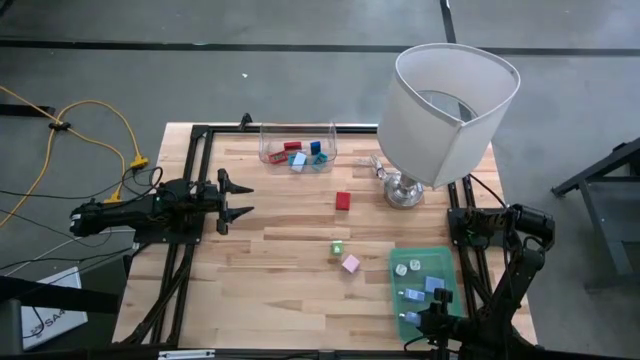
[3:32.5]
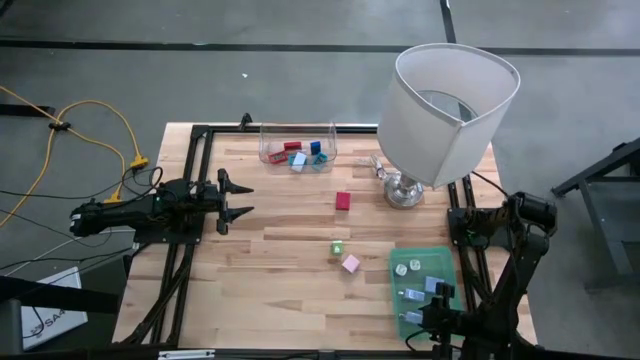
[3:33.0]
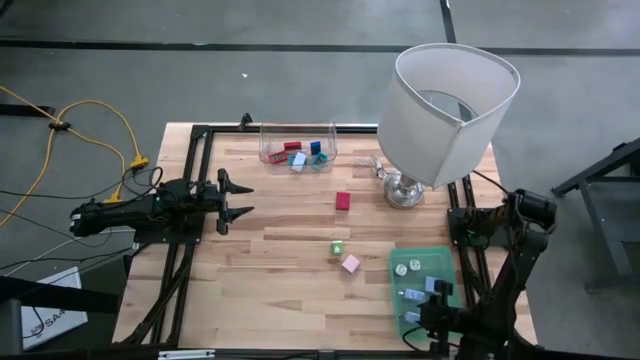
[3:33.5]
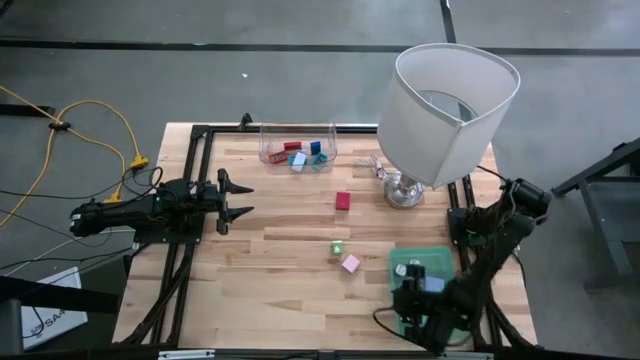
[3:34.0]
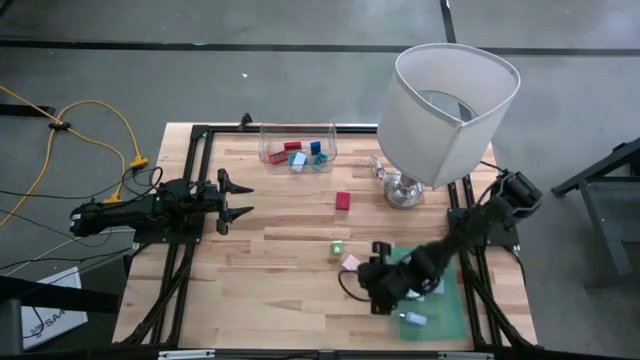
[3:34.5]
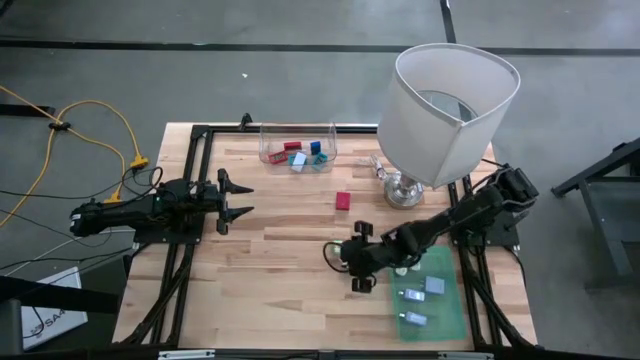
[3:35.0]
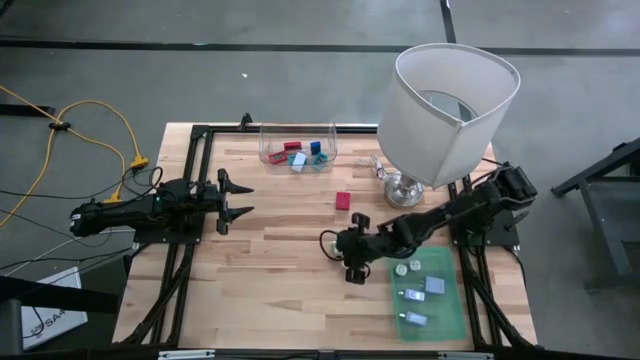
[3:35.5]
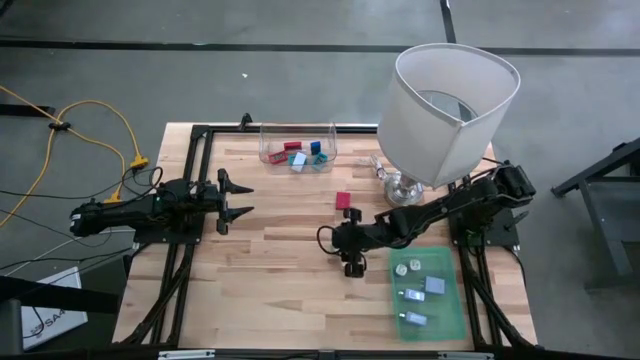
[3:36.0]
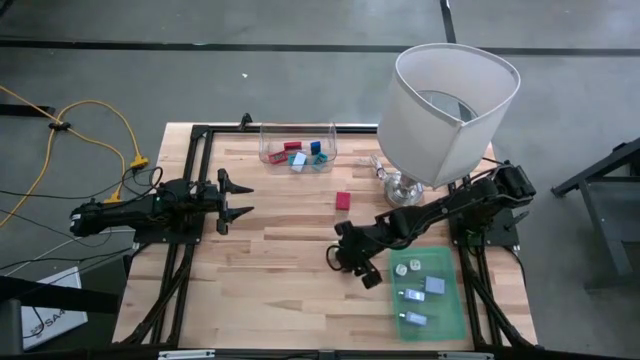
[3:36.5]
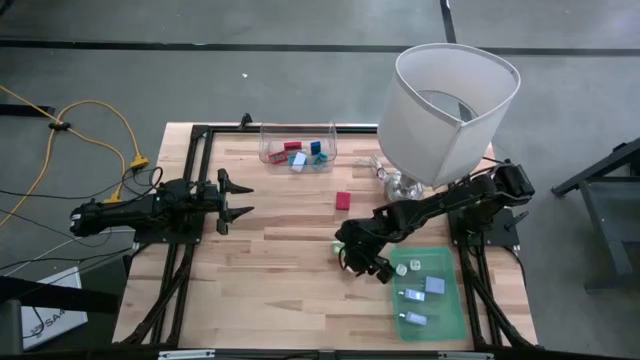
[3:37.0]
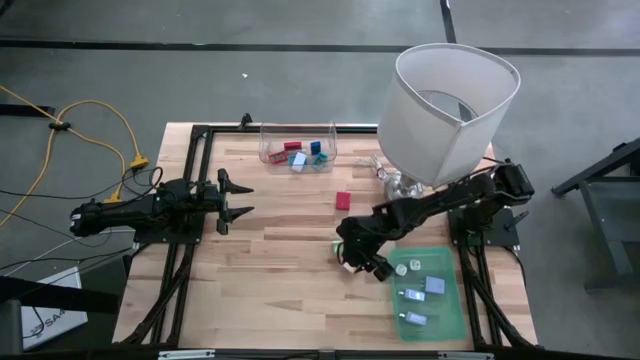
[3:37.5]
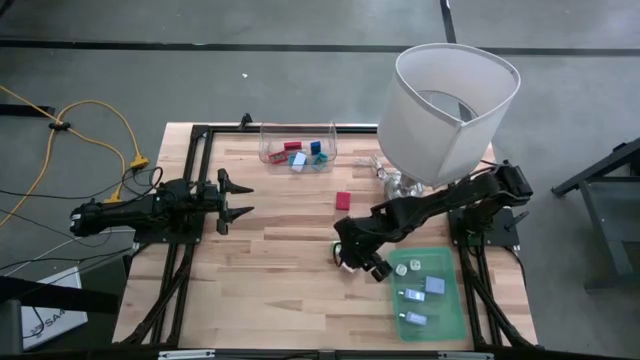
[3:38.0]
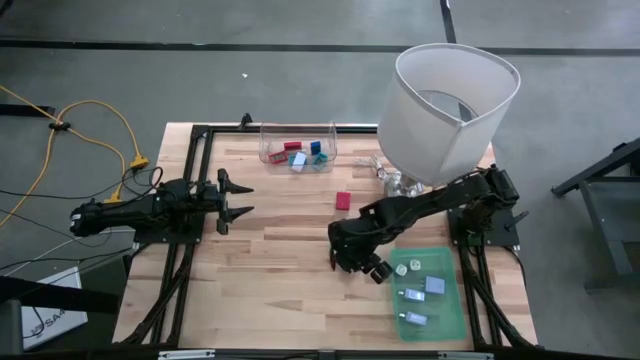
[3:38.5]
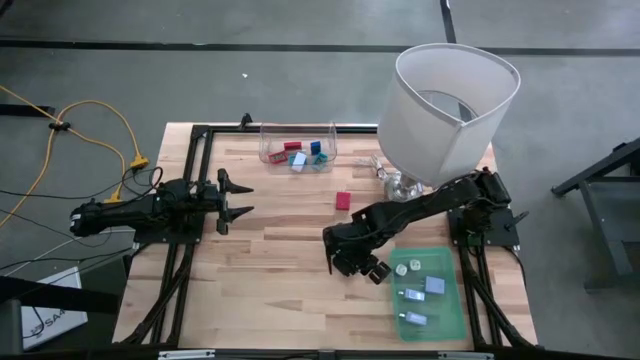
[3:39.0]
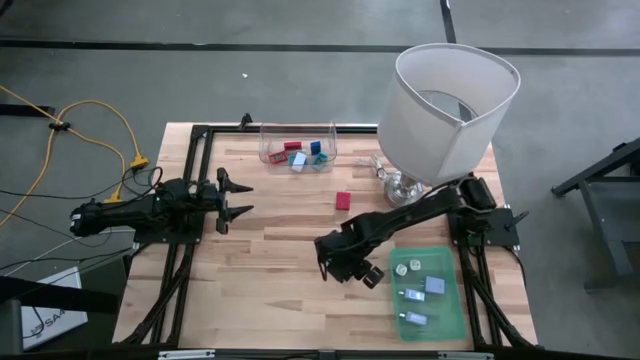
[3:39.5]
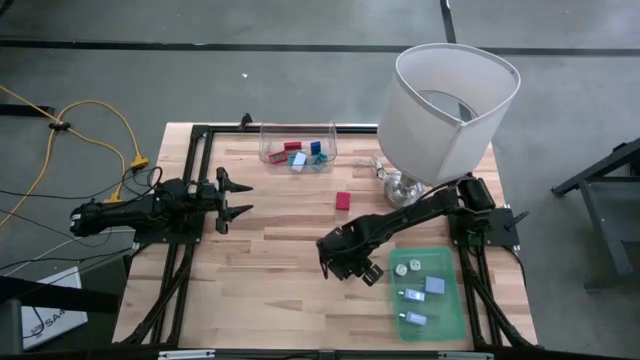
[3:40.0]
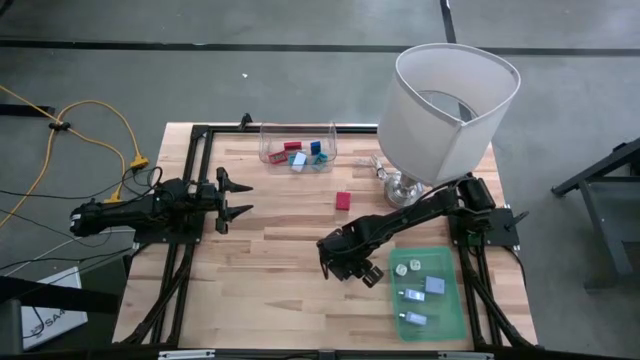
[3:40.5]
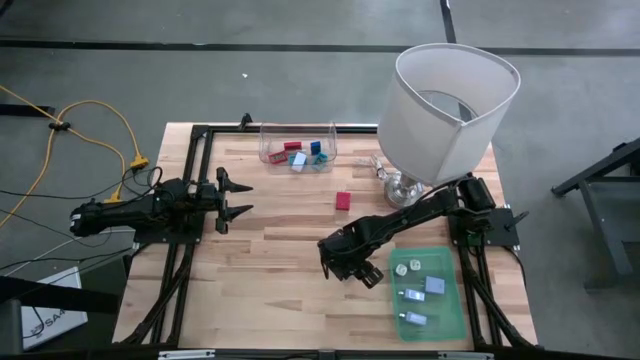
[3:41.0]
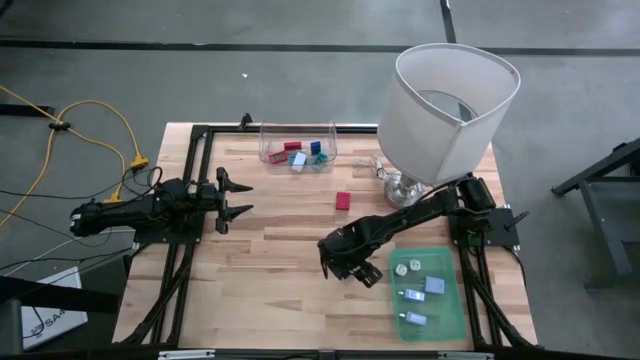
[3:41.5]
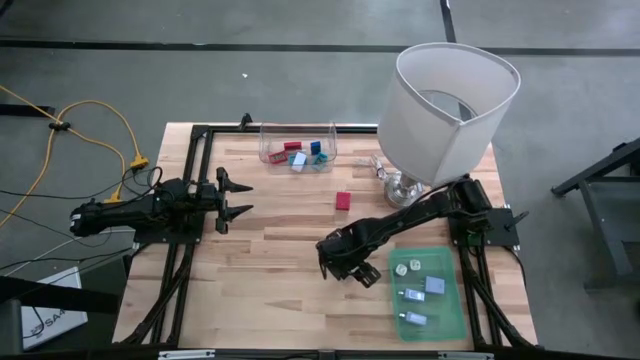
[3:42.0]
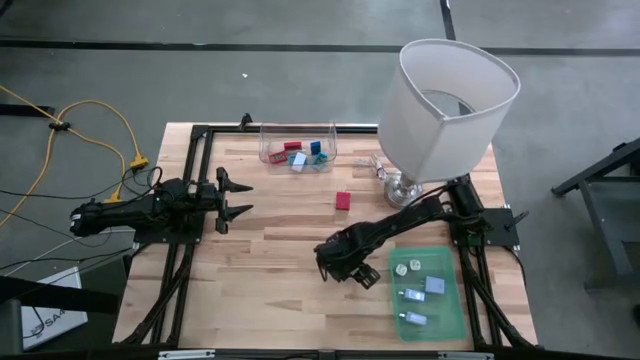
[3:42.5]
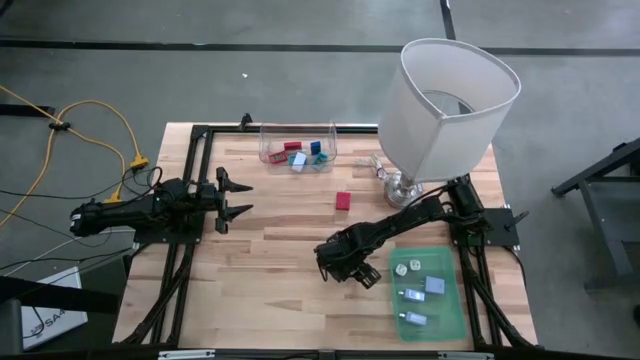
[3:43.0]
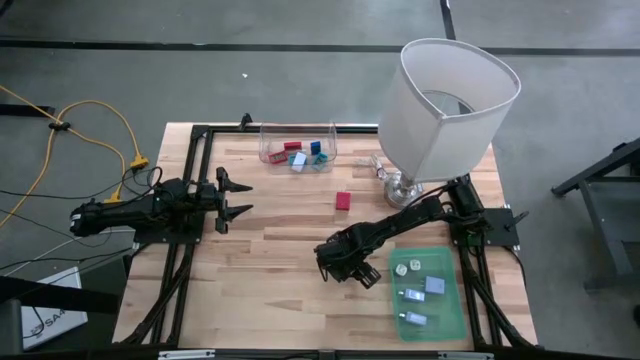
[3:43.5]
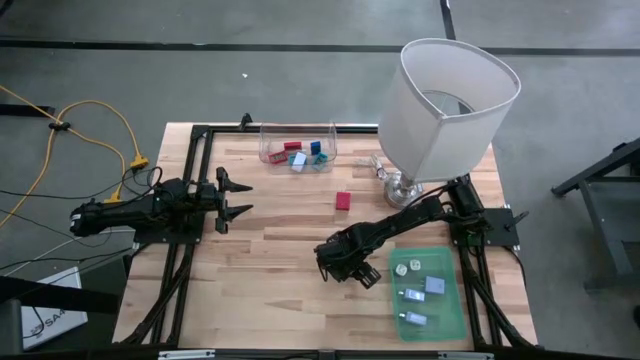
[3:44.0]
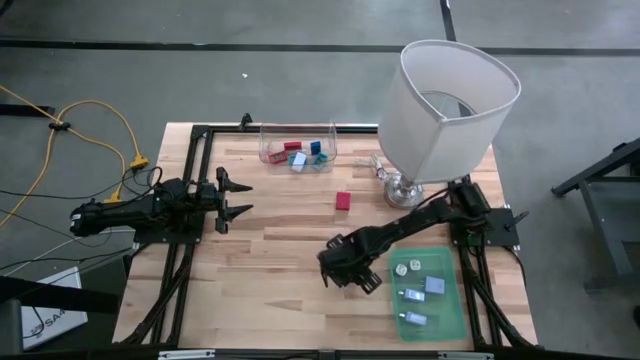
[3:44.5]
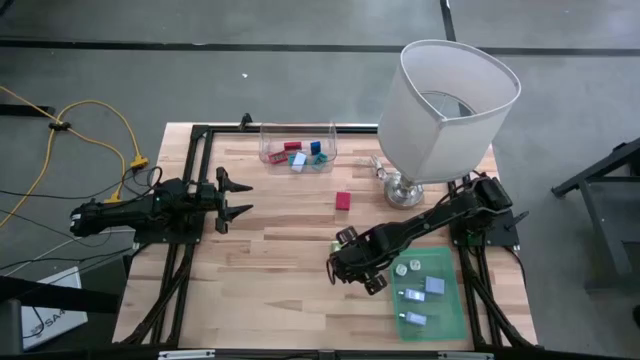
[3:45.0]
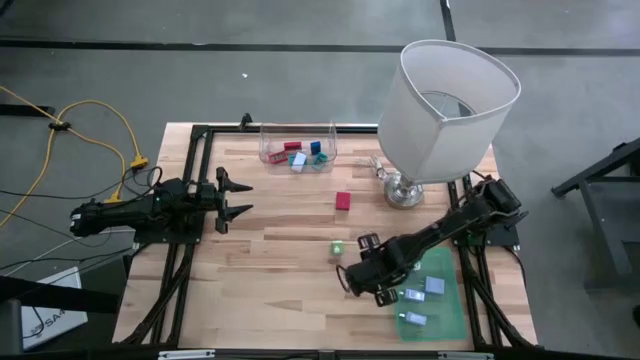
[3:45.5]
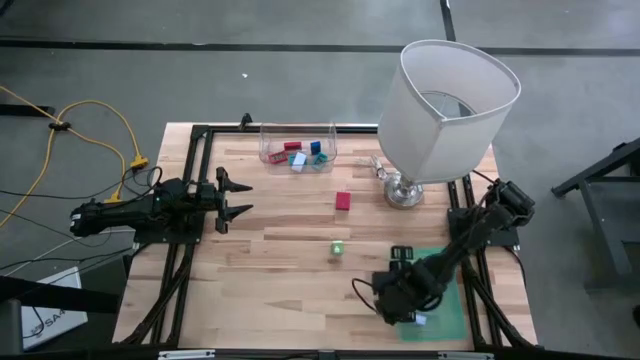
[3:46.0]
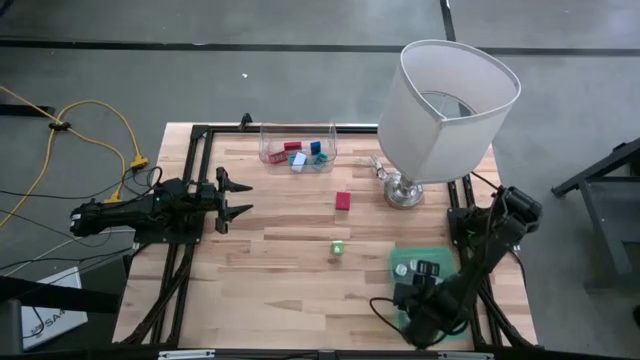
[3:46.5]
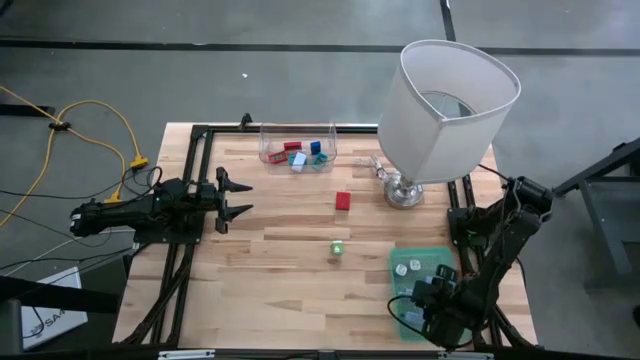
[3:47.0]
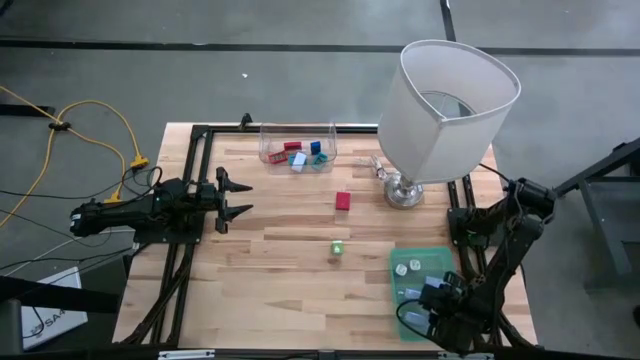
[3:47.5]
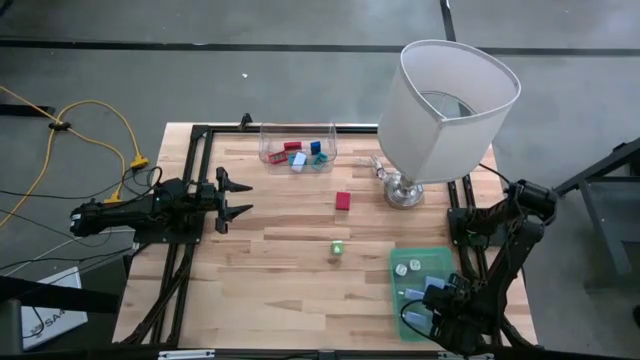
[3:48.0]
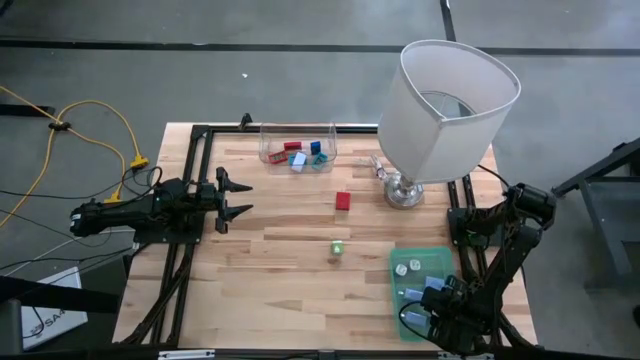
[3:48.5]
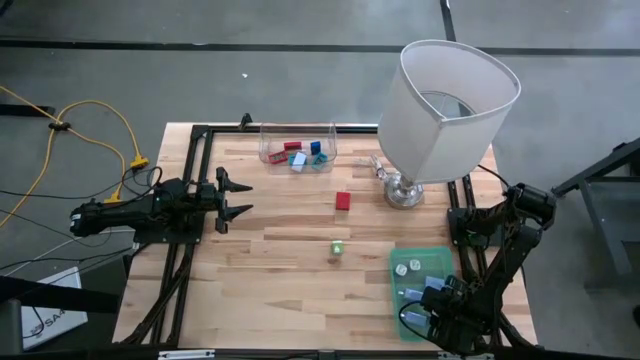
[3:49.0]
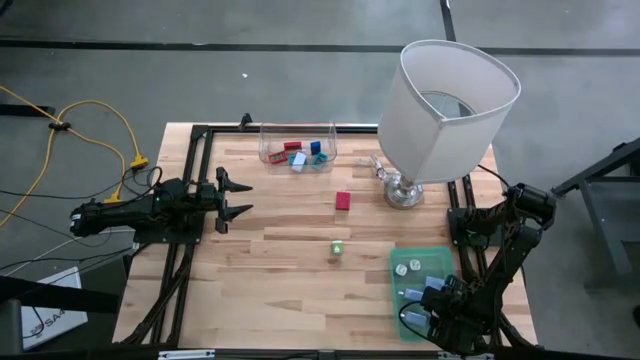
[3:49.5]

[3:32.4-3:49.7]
Task: Pick & Place Office items
Put the pink charger adapter into the green bin

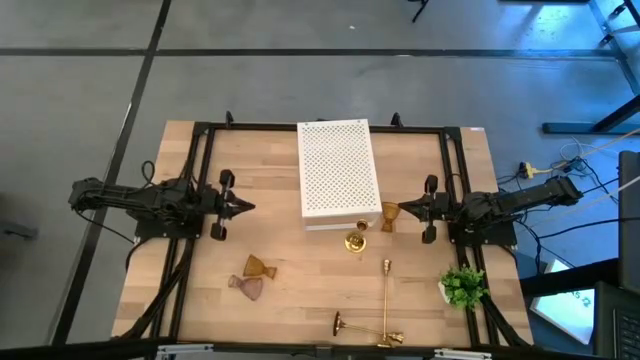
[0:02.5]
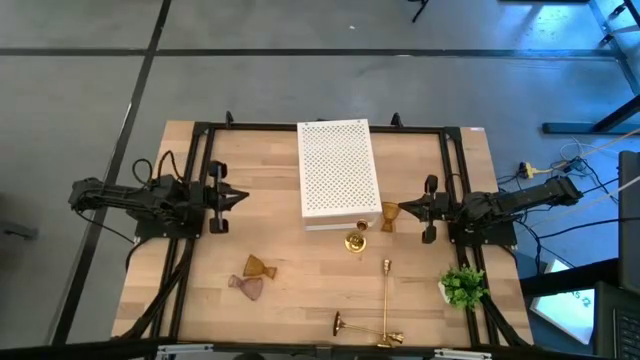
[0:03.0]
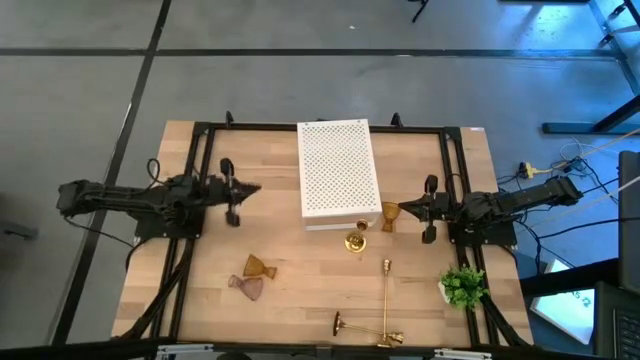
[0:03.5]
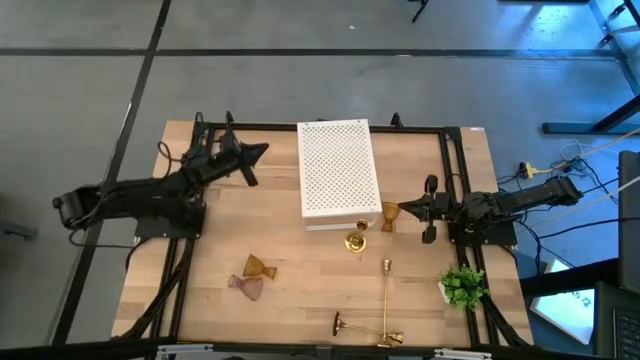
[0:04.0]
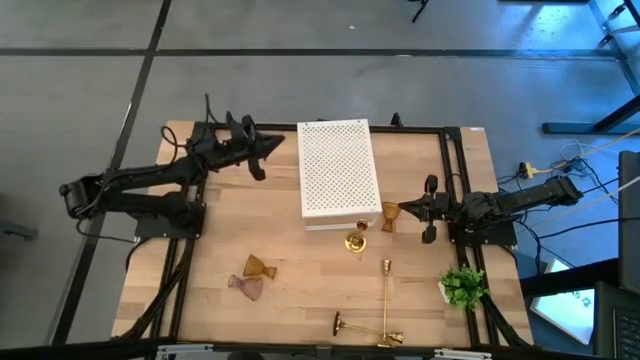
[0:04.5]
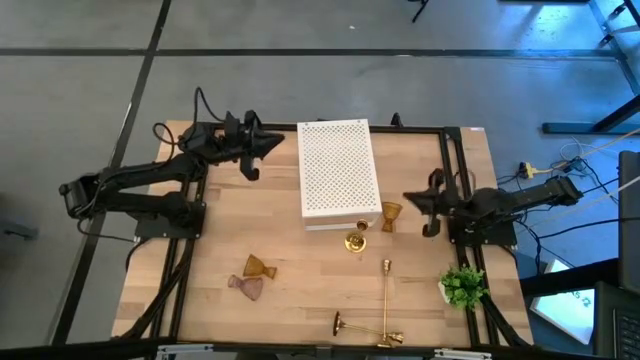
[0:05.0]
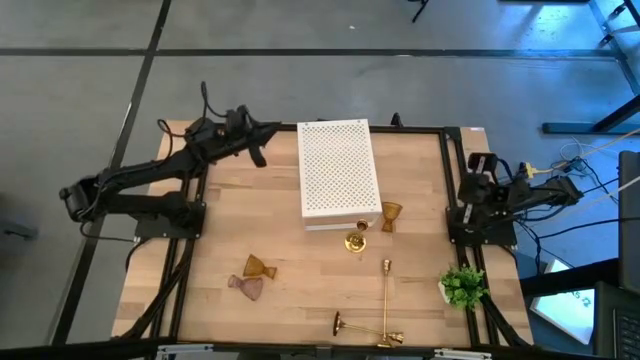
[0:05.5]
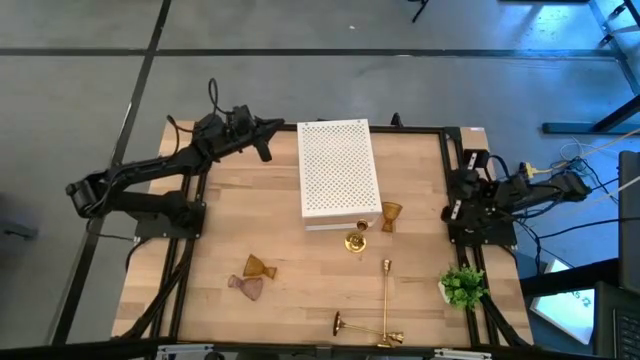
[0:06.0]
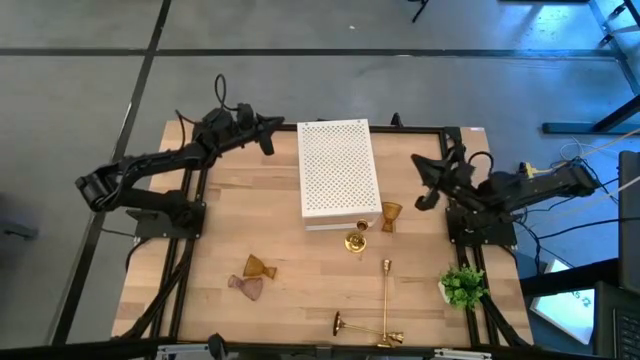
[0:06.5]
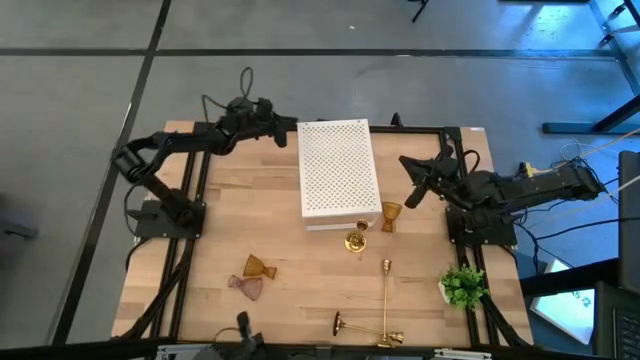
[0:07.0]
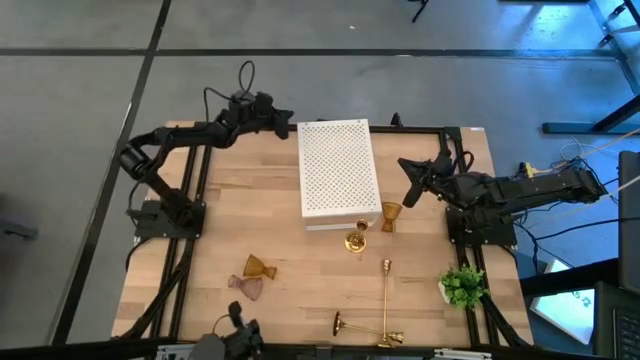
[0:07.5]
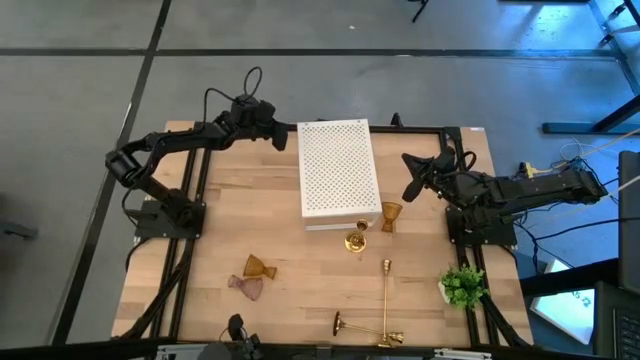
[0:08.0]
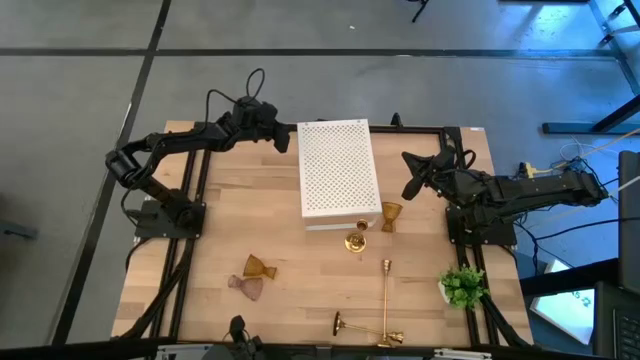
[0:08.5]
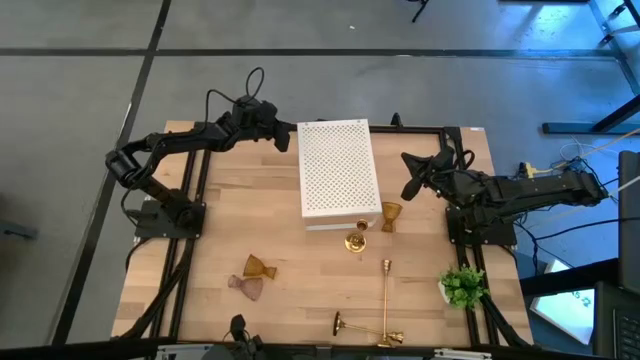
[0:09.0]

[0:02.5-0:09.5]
Task: Pick & Place candle stick holders
Adjust the shelf
